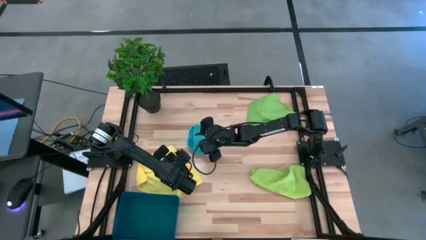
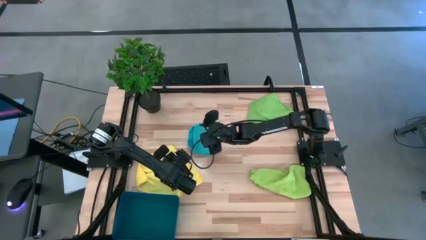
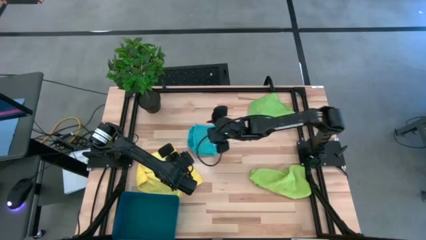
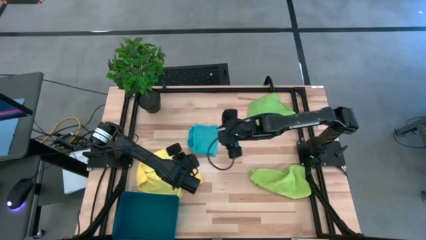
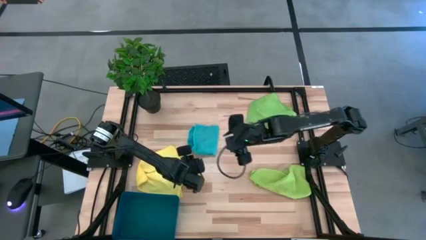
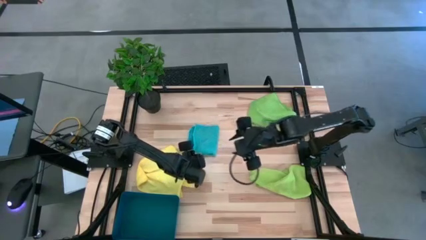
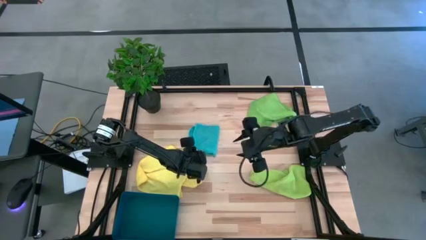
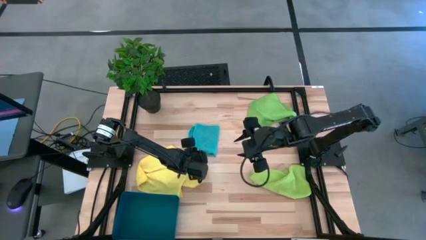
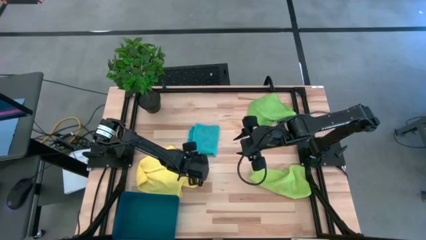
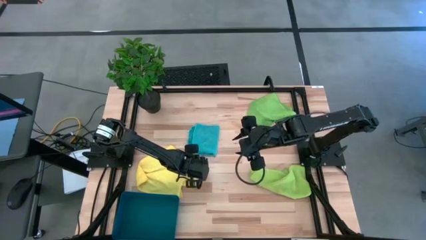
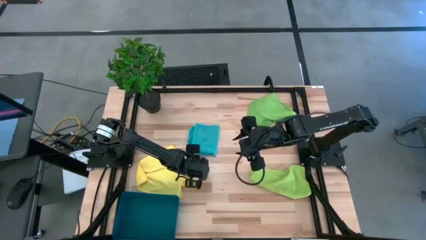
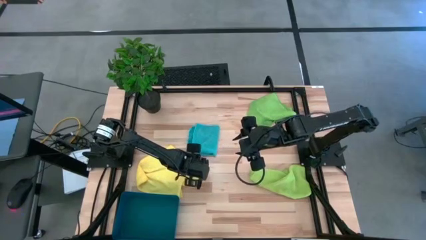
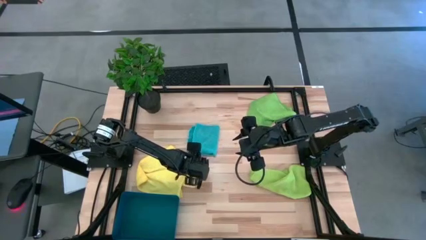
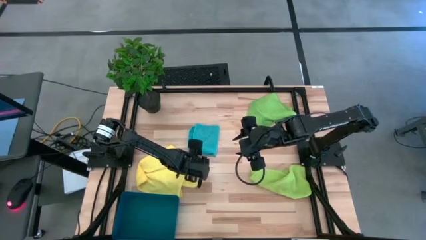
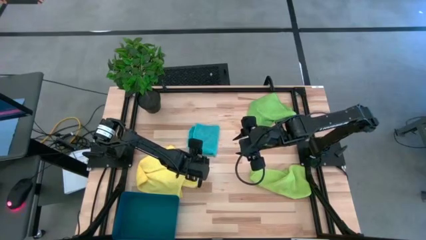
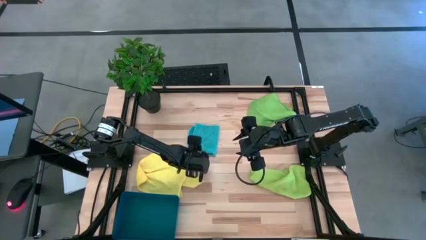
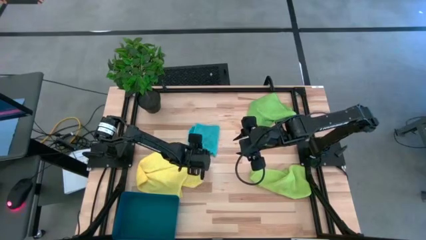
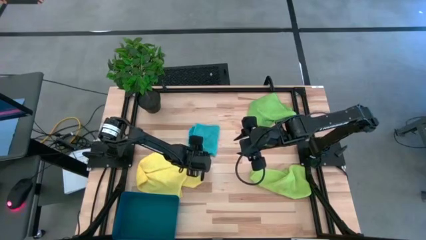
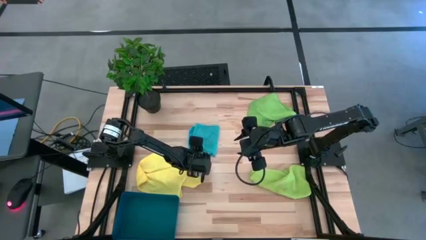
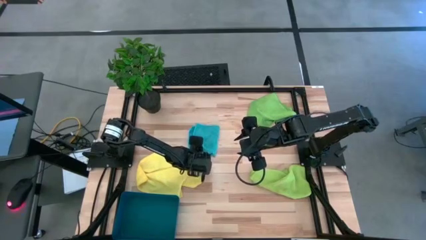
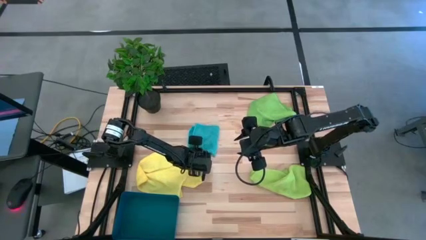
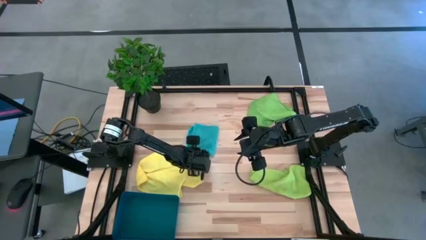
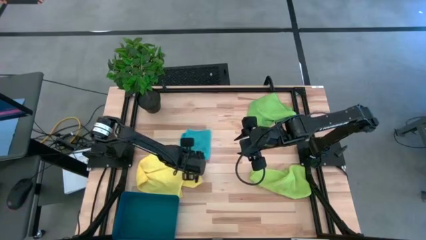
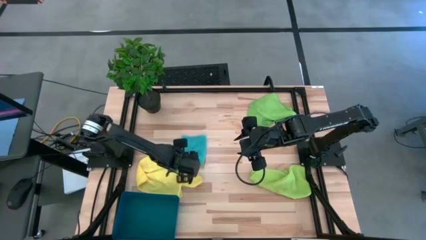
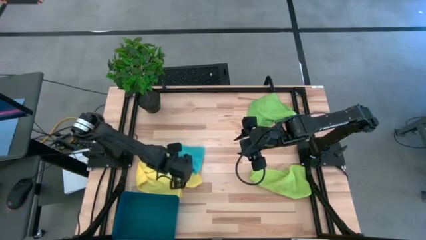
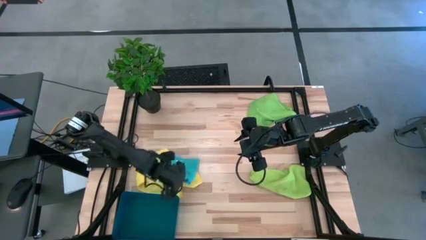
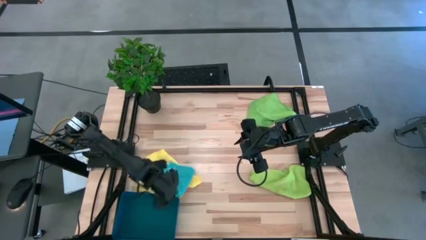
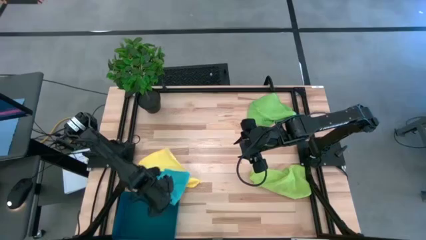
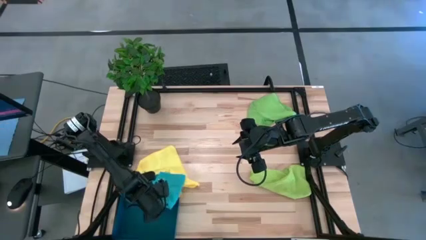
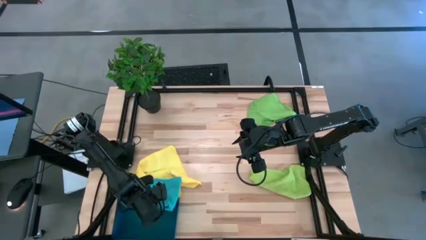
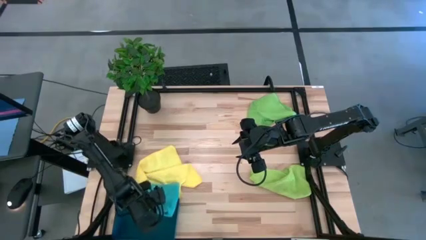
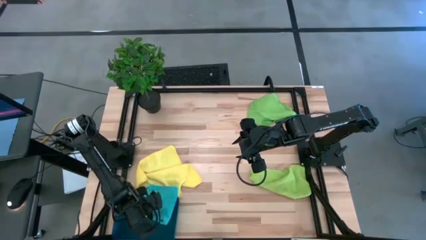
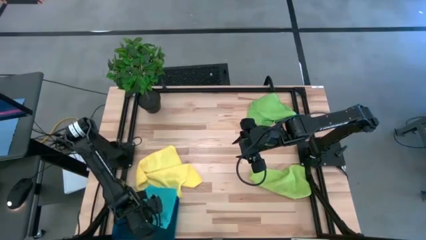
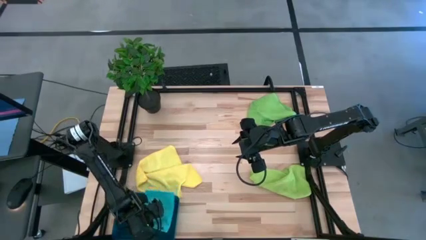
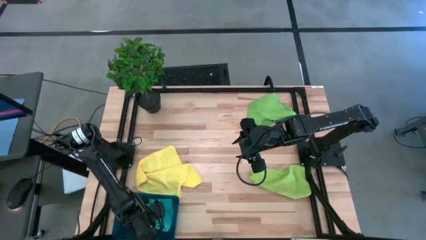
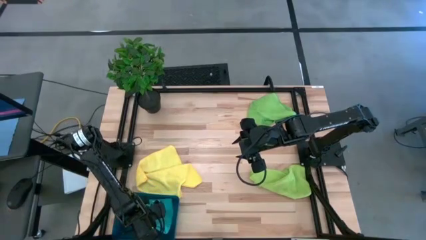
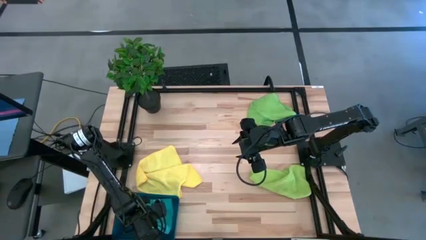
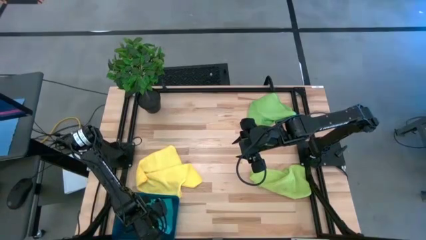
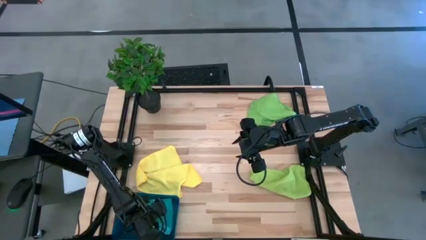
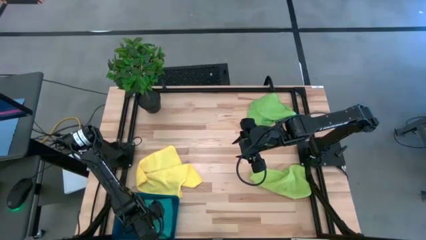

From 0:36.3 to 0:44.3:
Task: Fold microfiber towels
Put the blue microfiber towel into the bin

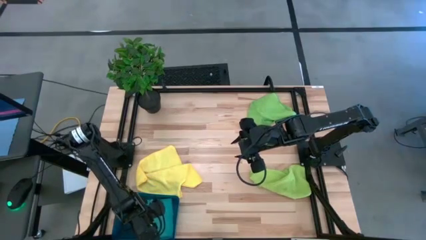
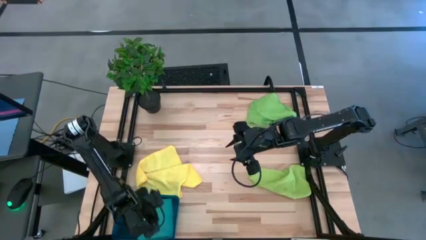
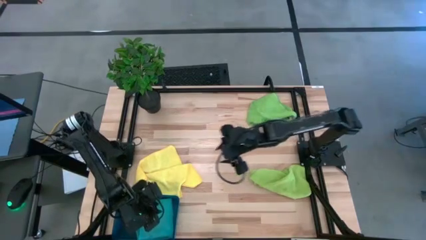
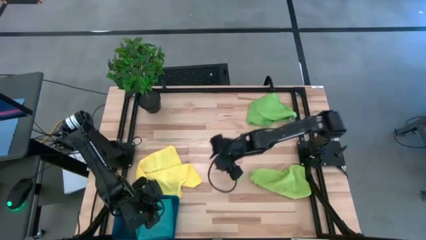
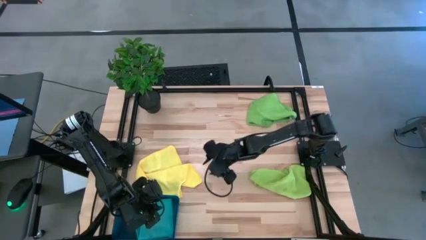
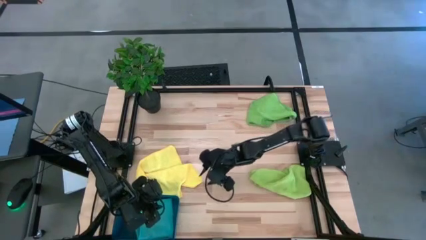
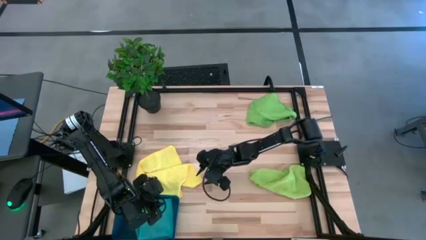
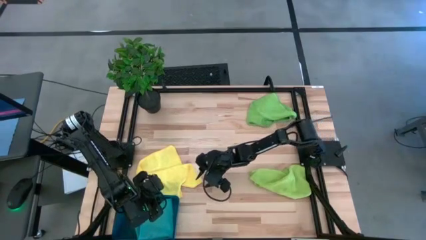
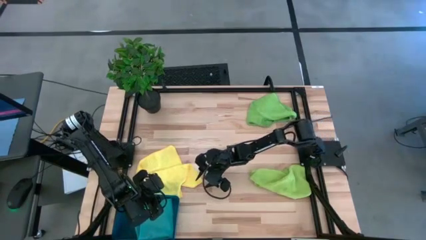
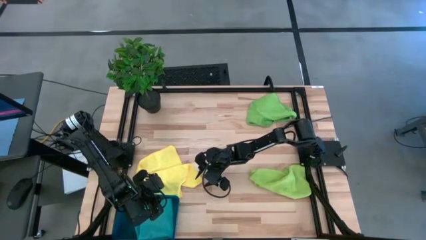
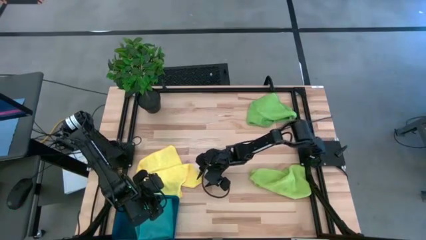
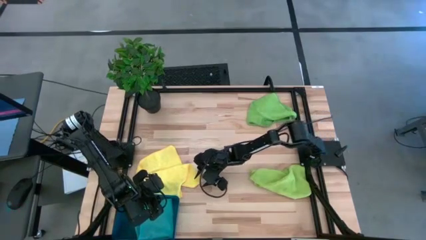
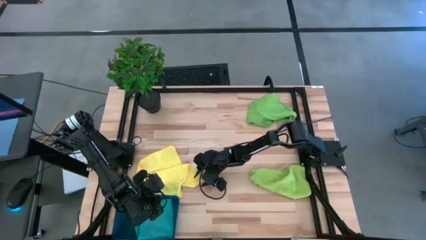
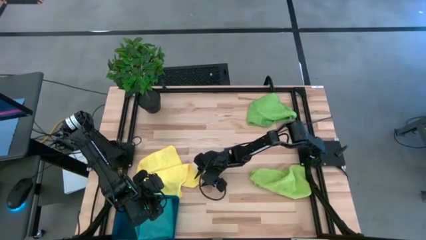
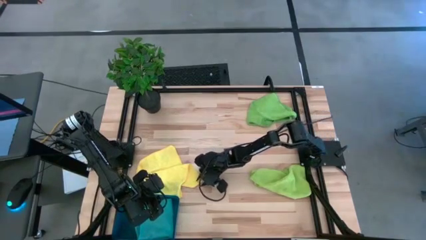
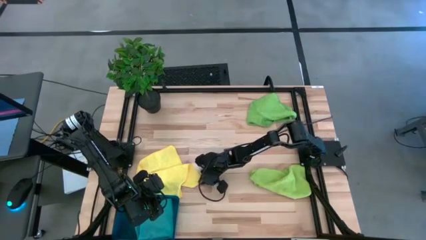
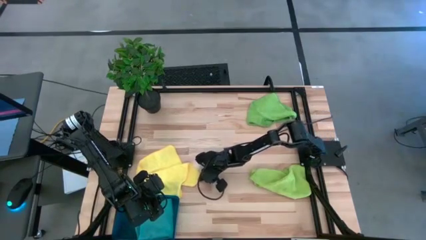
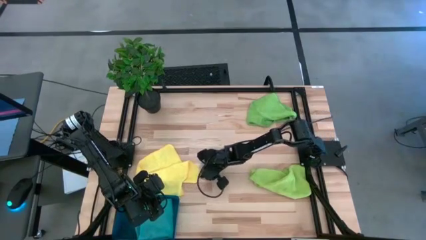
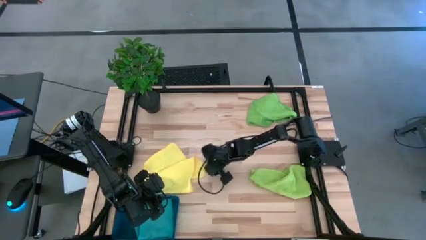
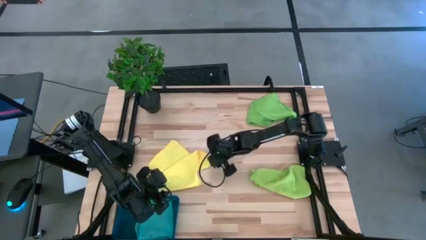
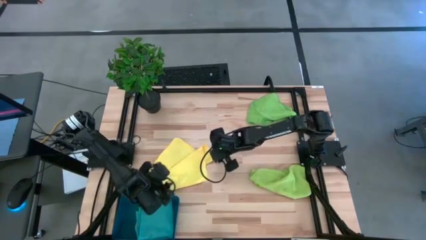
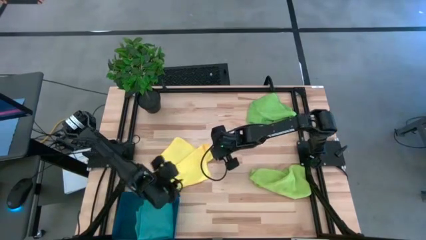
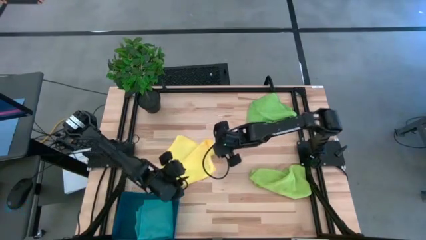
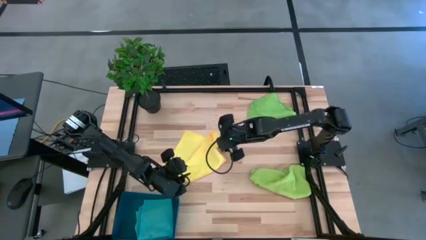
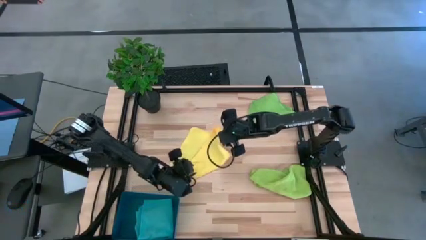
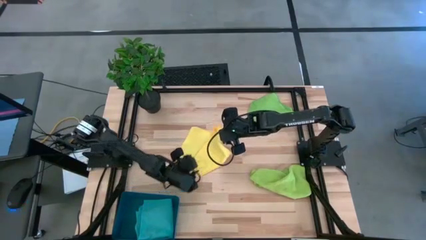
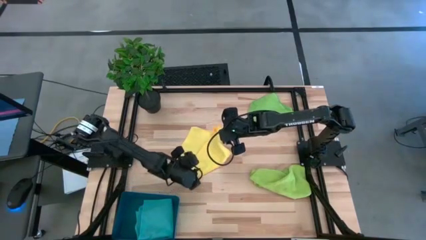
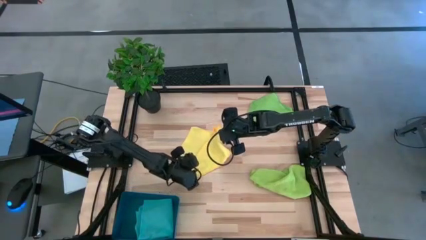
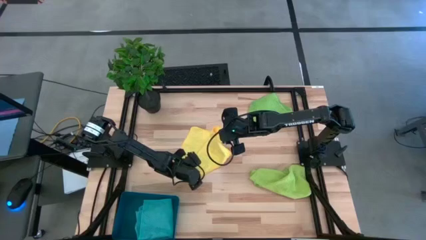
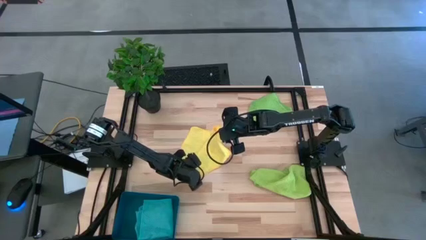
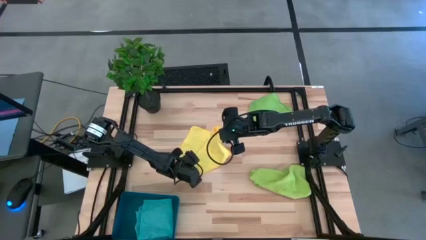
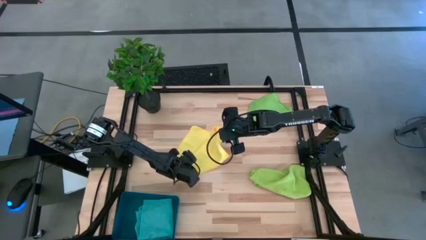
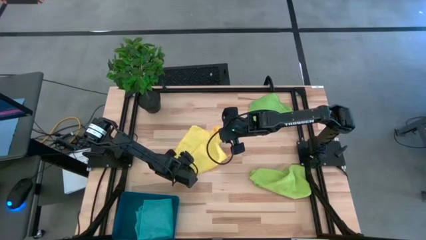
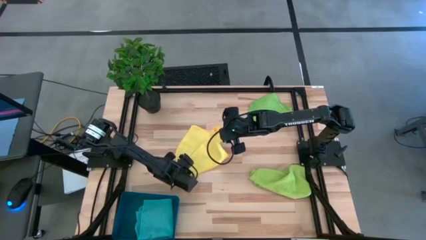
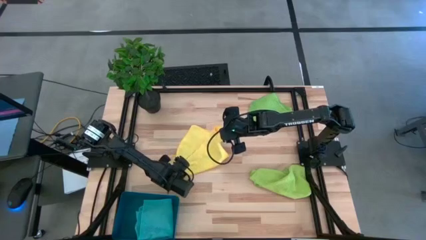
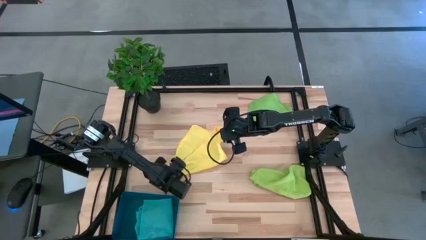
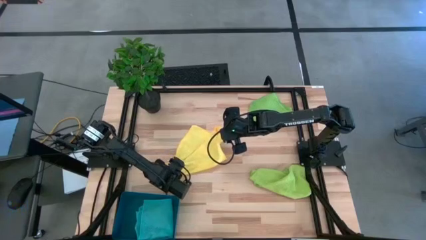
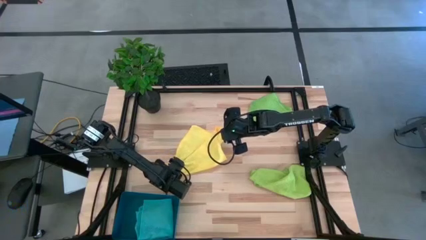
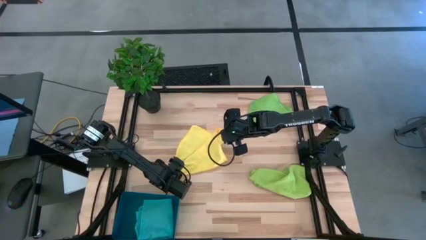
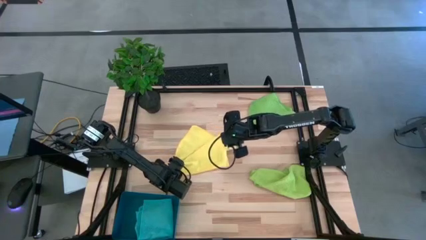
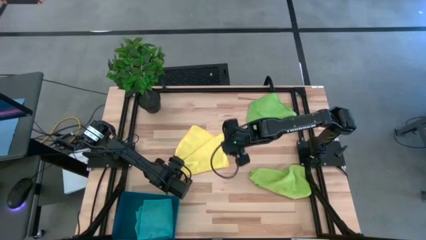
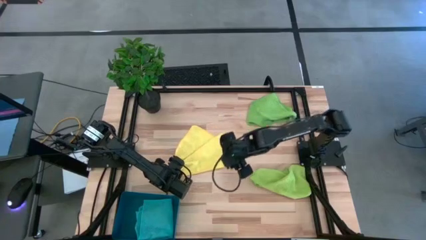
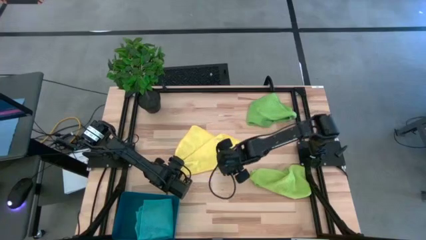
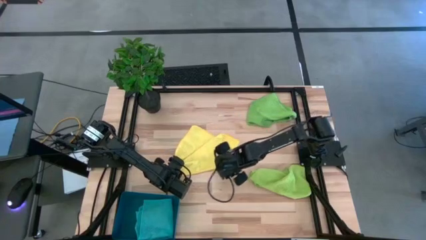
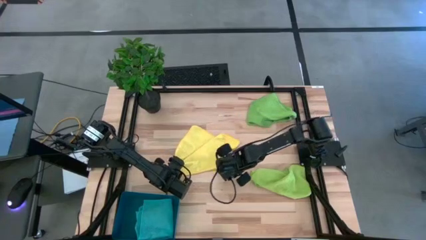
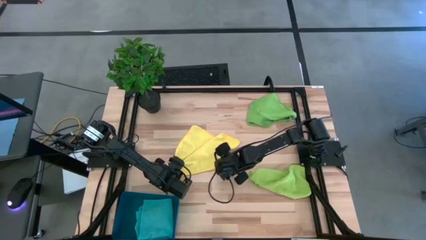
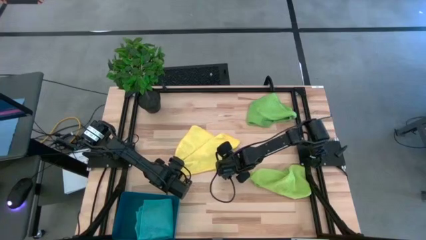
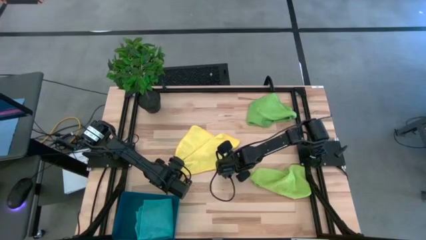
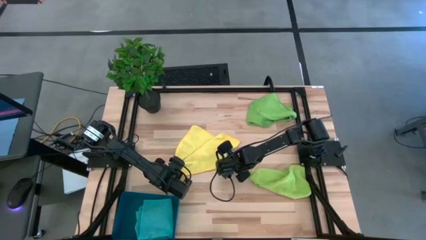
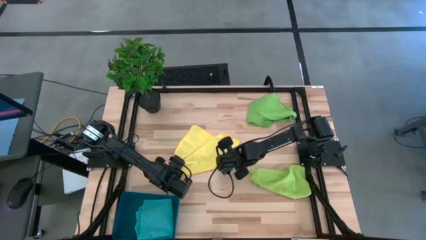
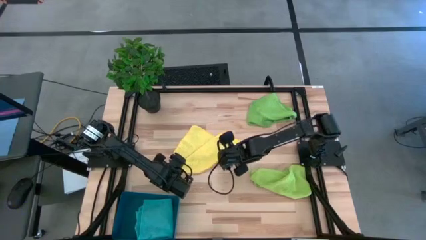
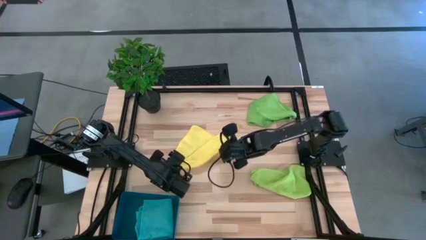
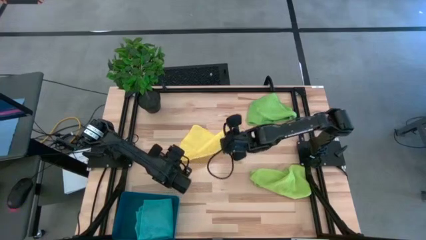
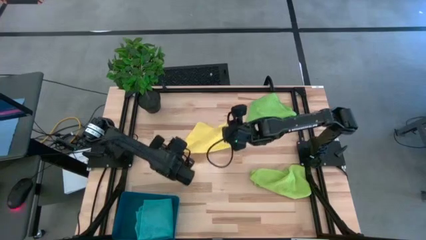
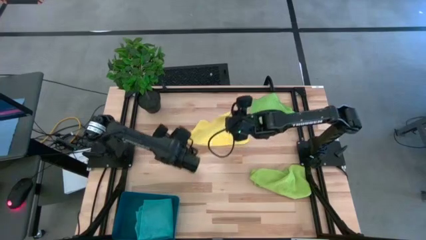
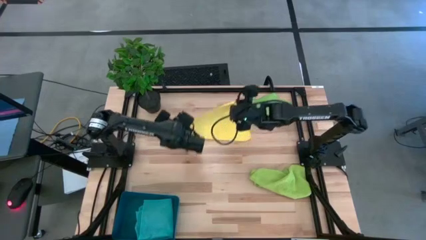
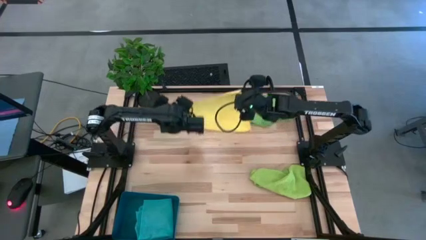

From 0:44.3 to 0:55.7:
Fold the yellow microfiber towel
